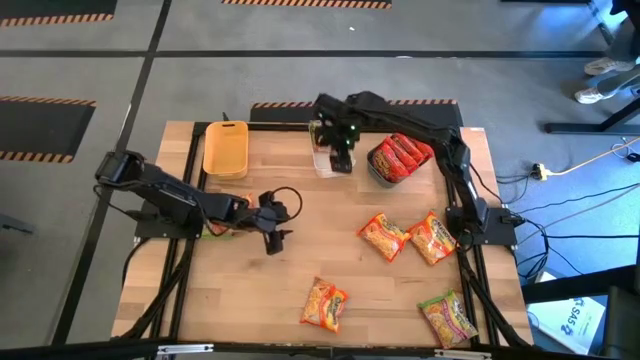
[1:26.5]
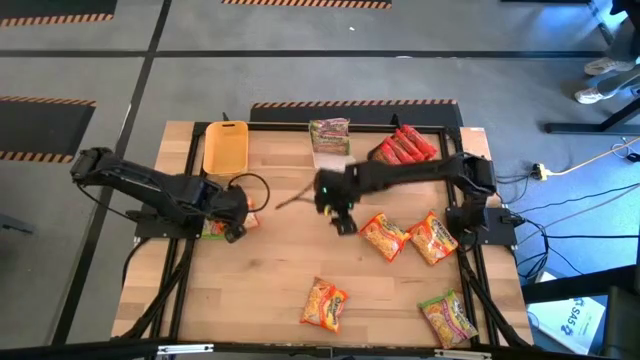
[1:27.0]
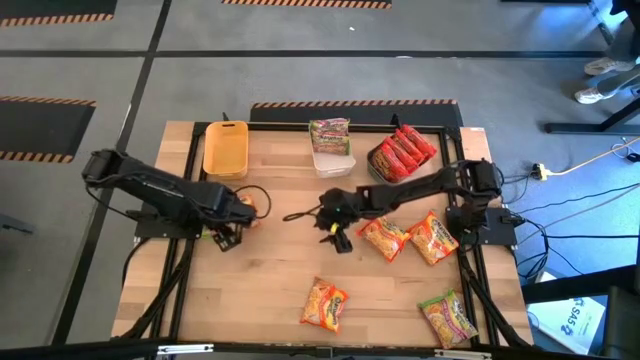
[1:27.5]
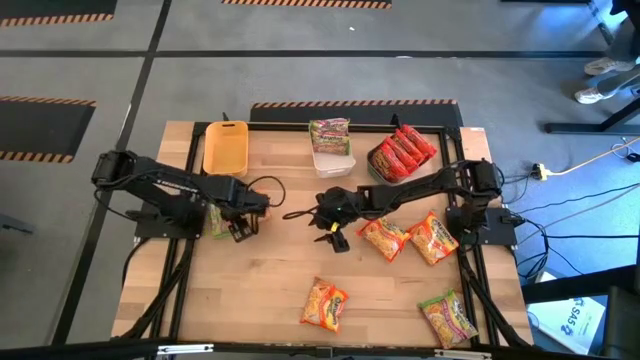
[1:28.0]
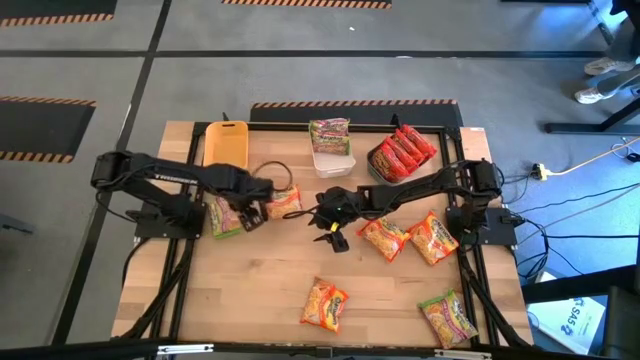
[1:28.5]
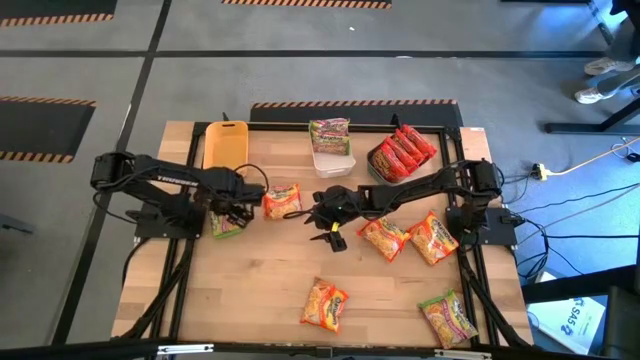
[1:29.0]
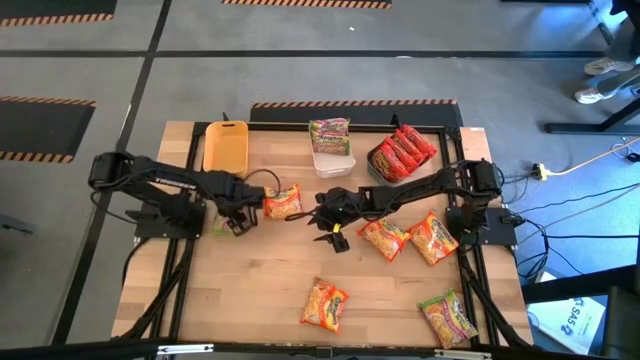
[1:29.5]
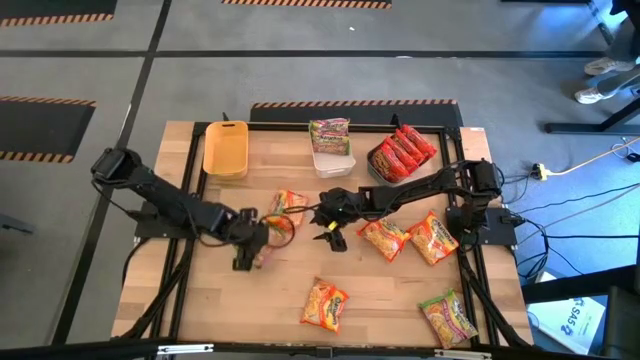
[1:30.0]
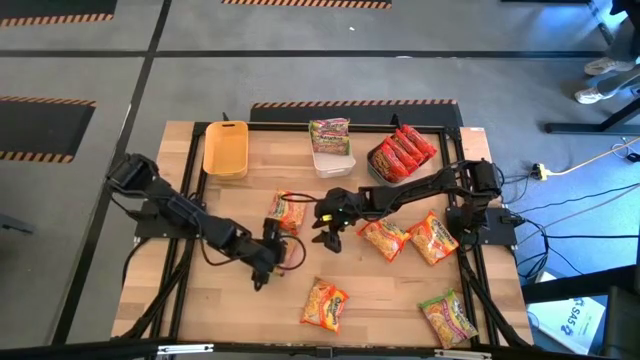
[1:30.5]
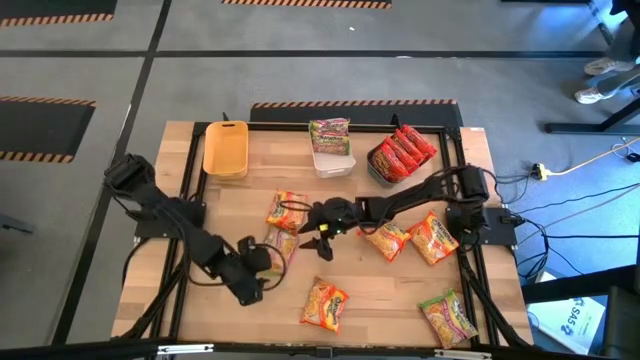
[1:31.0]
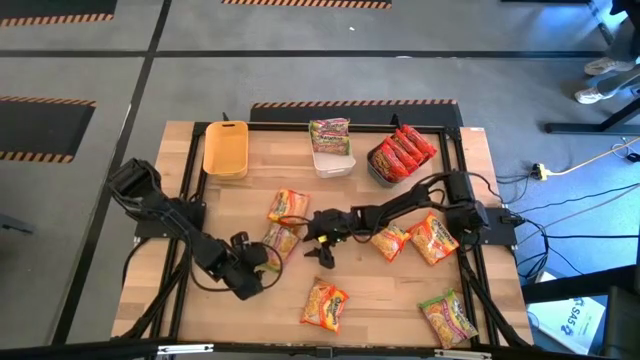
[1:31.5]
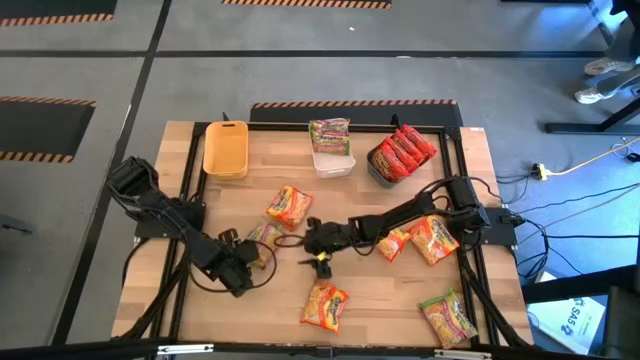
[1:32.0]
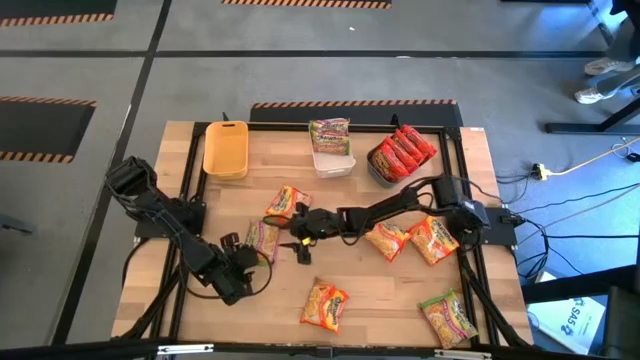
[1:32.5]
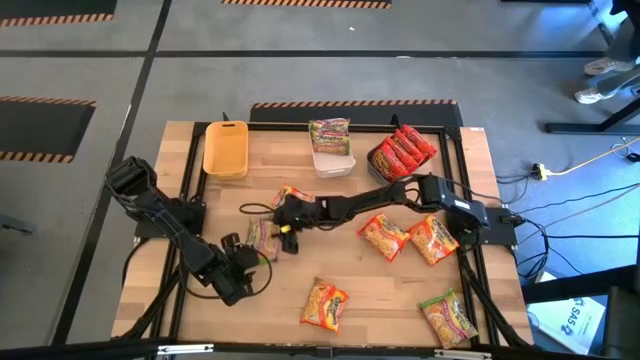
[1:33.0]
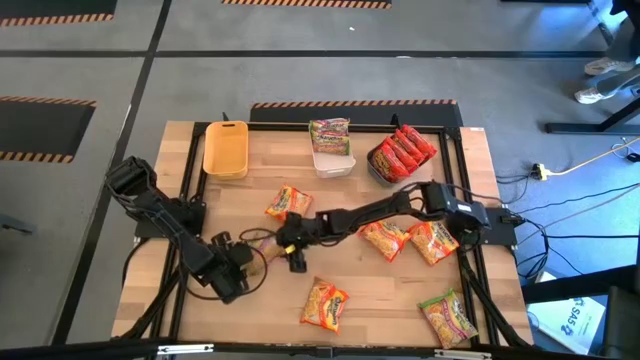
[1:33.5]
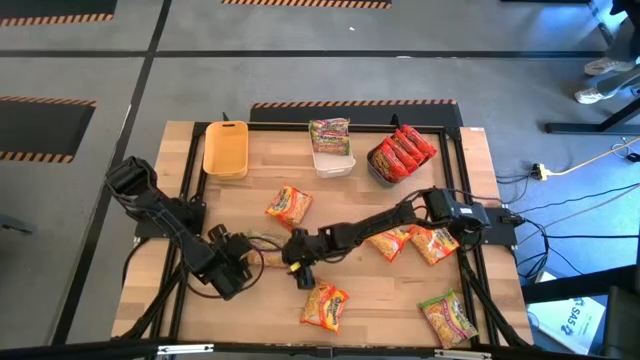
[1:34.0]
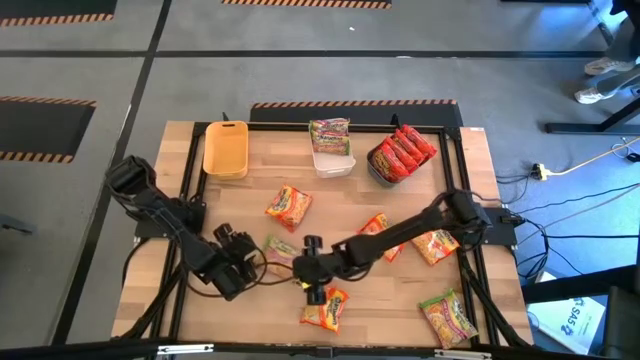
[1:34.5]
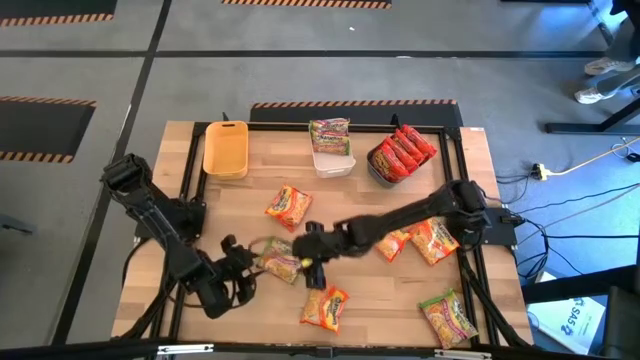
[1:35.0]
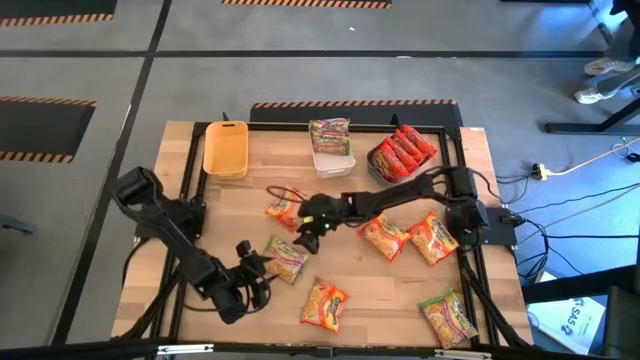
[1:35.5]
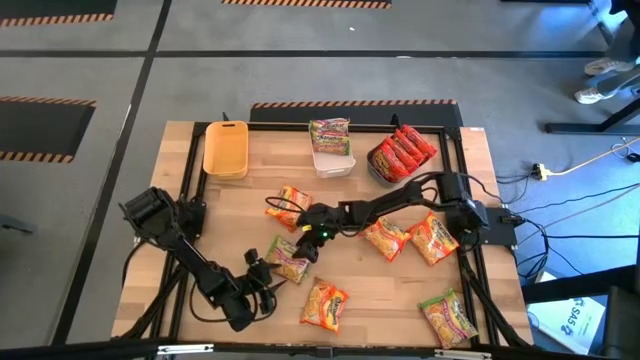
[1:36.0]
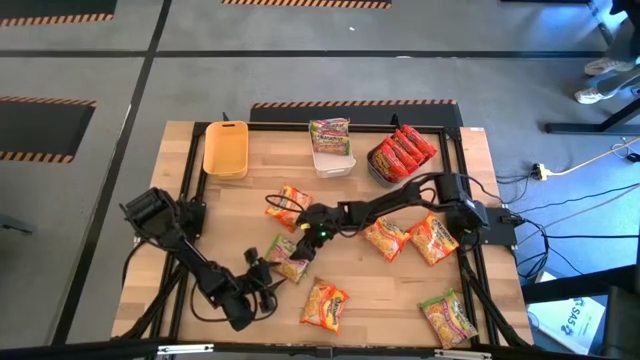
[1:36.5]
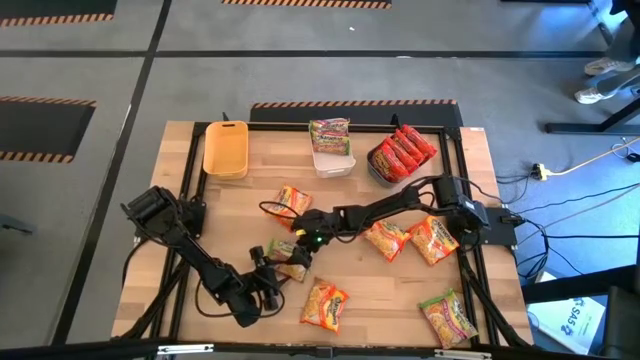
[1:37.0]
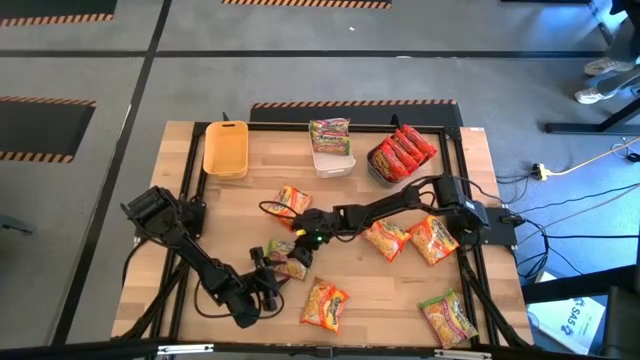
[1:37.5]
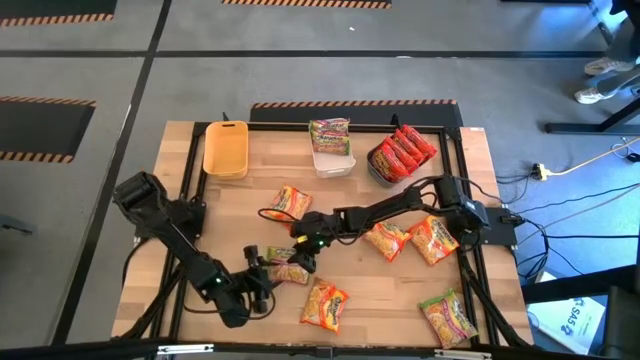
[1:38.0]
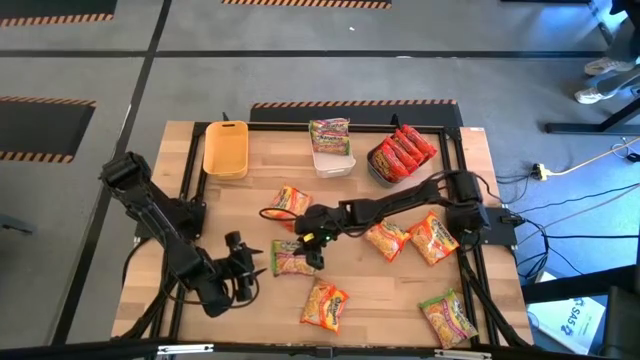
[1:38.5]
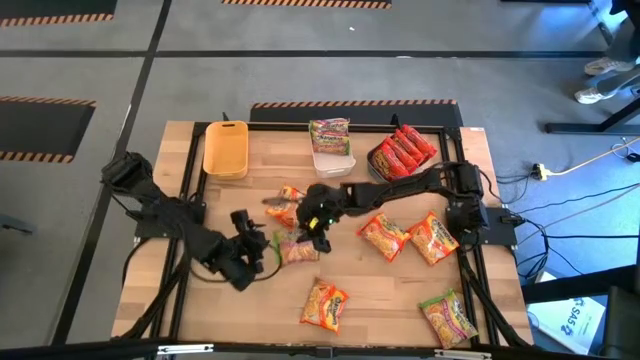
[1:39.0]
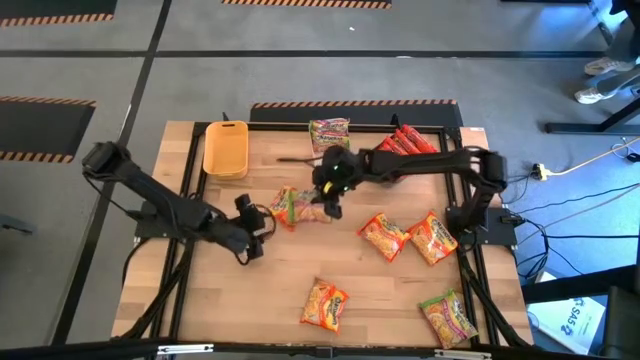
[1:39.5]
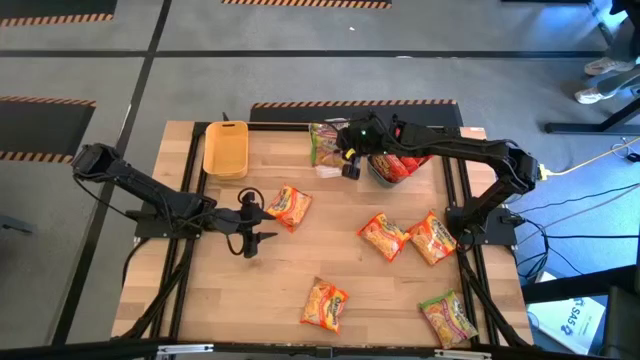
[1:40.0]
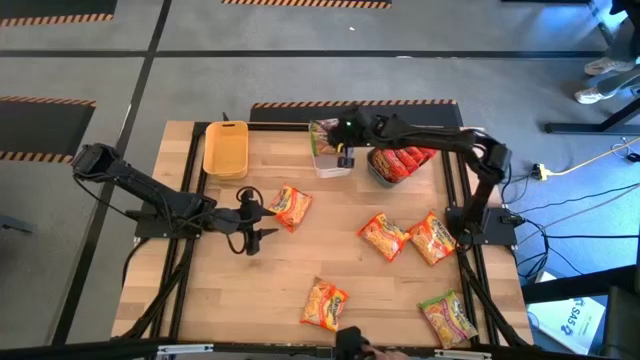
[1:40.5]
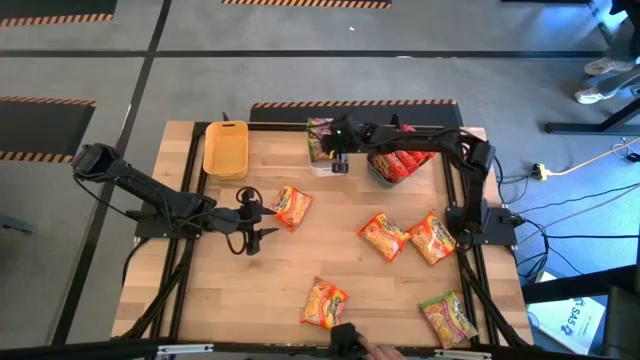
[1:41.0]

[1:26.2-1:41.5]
Task: Sort Maruchan noodles
Put the green noodle pack into the white bin

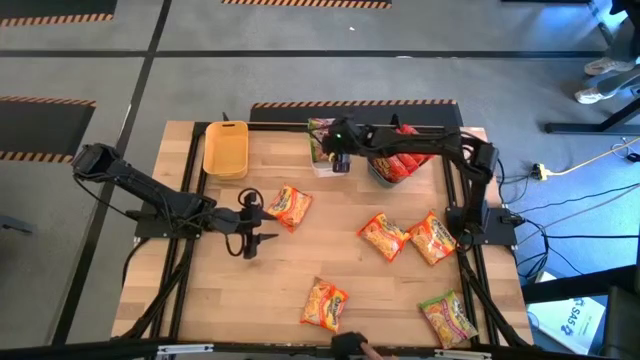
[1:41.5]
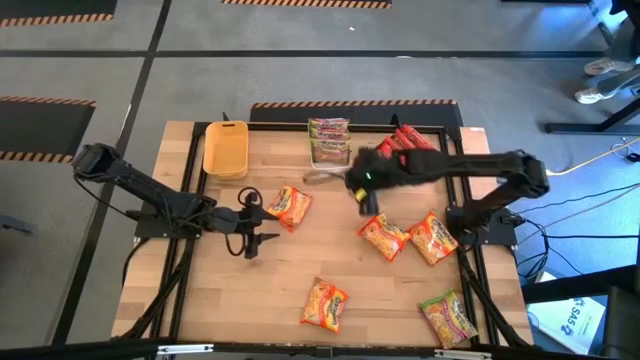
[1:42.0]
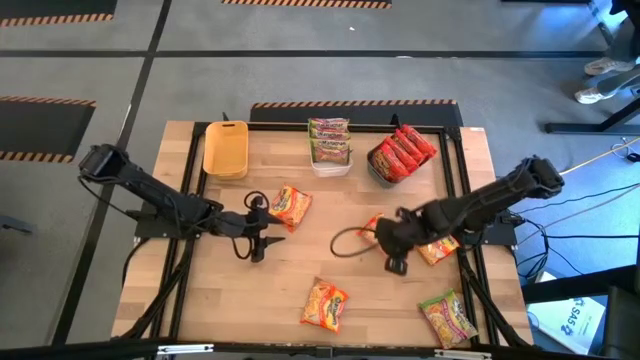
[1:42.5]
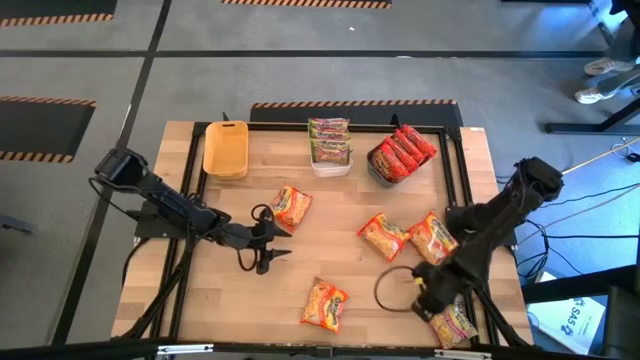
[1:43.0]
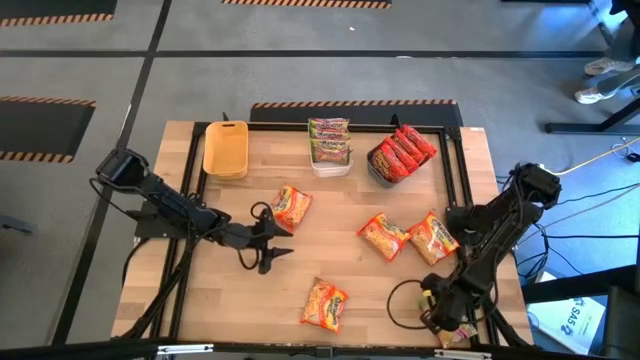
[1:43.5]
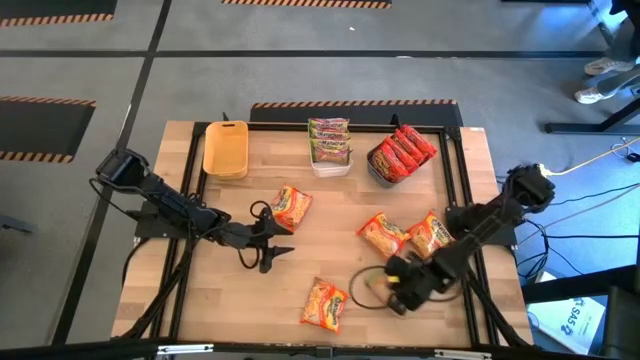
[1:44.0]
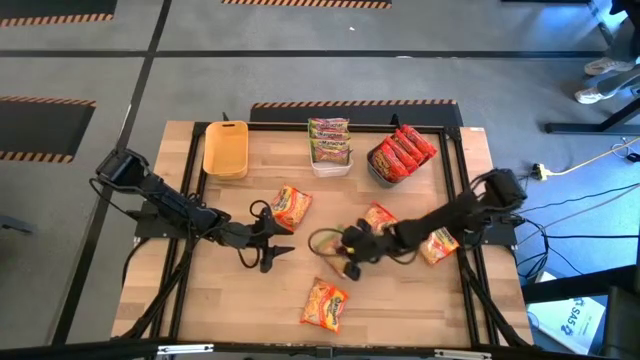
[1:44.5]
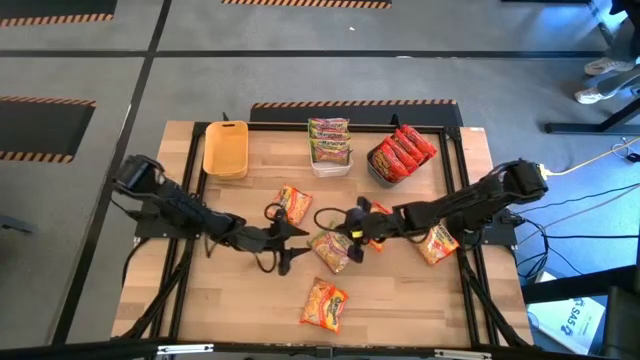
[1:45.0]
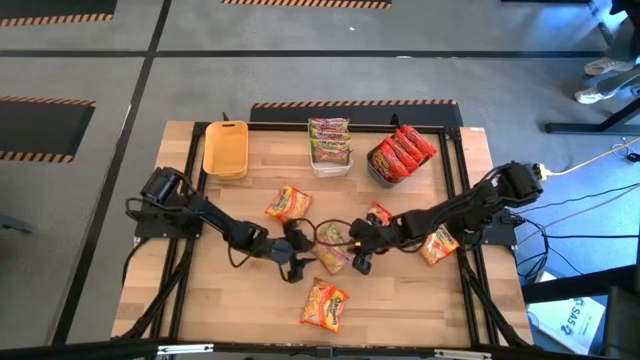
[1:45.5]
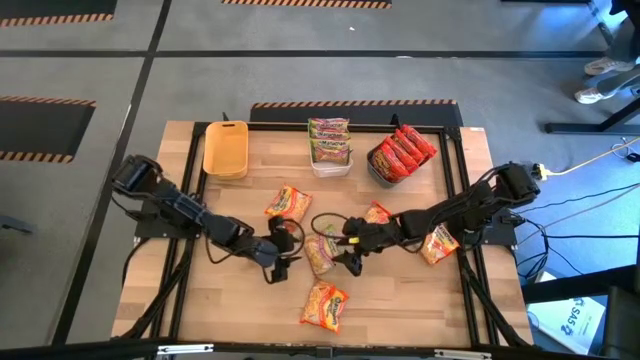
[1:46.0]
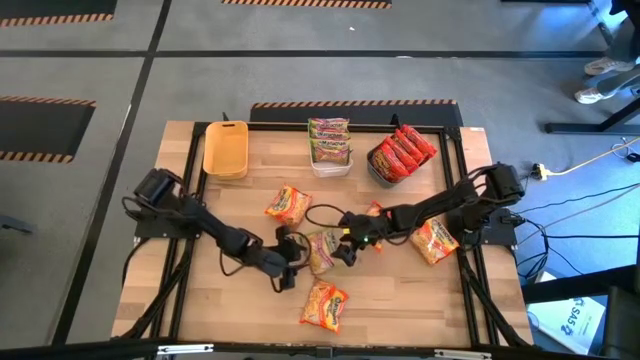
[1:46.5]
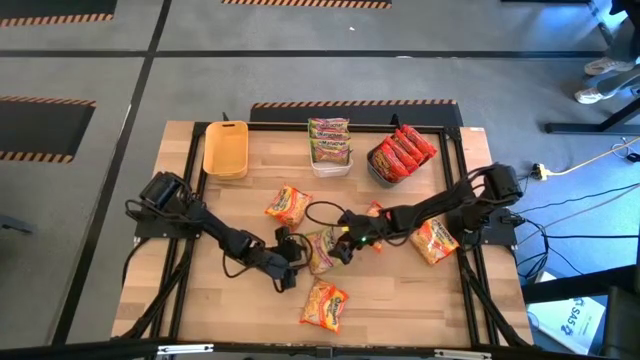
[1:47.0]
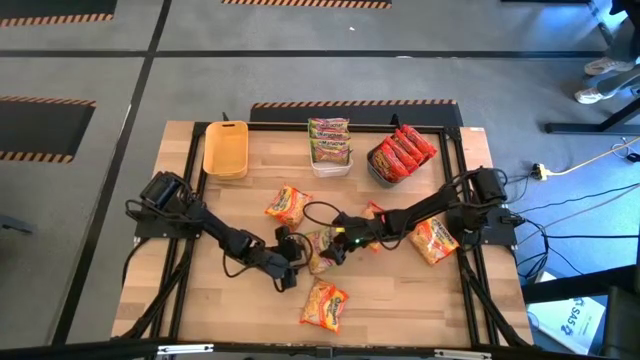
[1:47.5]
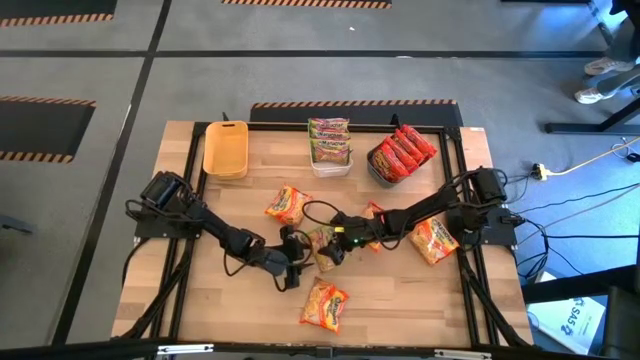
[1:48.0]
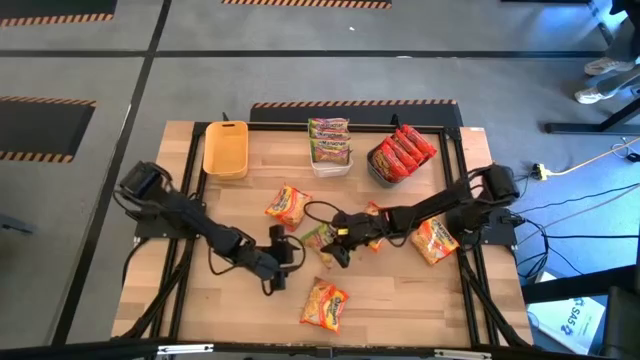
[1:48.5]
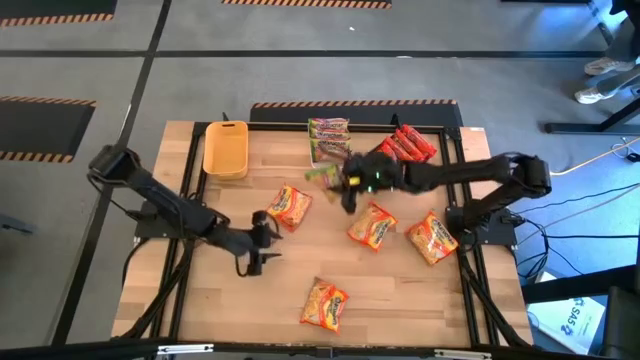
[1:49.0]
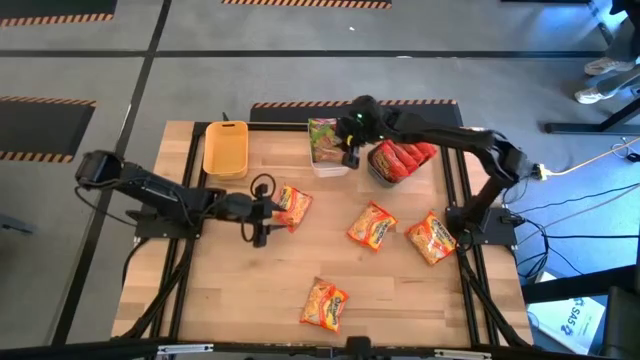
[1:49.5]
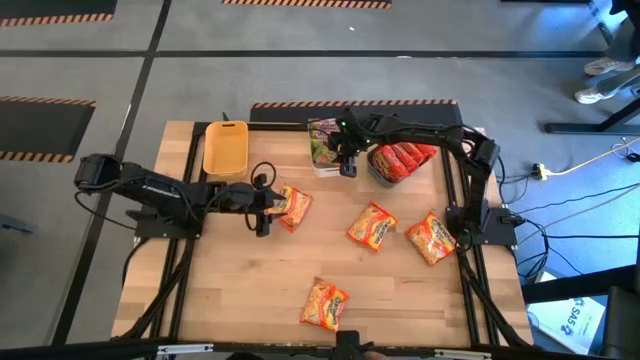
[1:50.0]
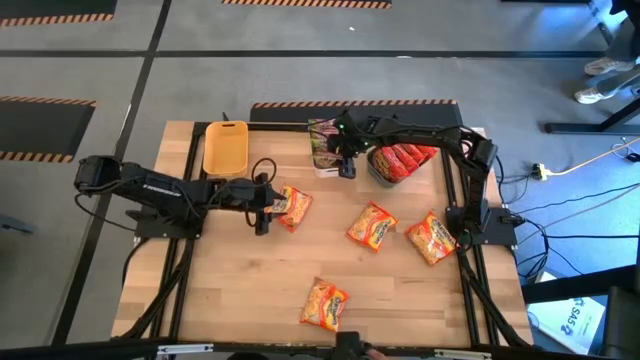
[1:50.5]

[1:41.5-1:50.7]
Put the green noodle pack into the white bin
